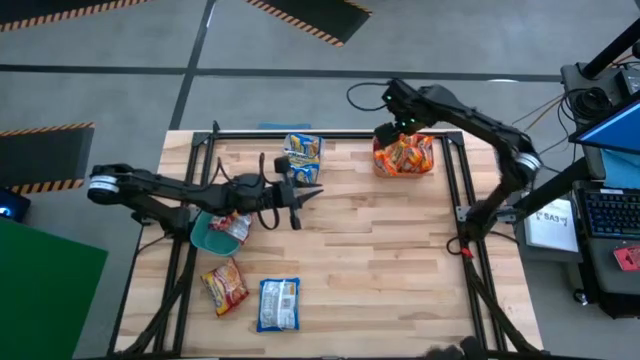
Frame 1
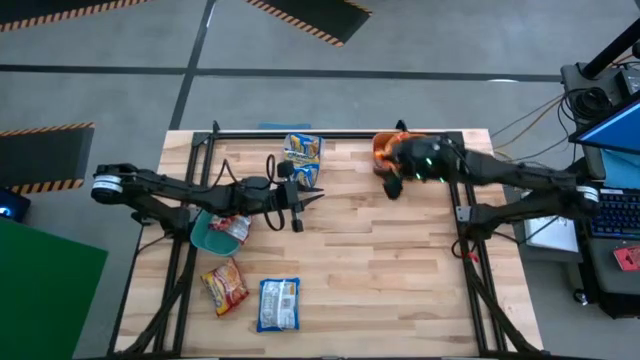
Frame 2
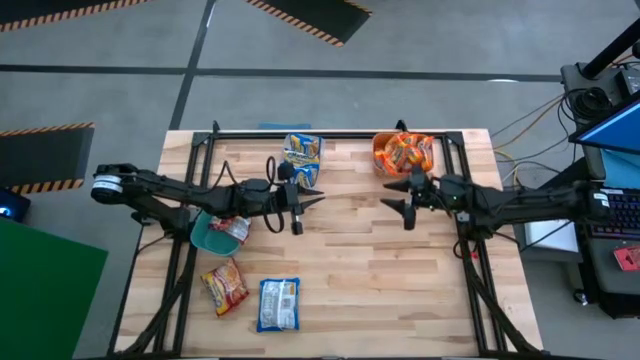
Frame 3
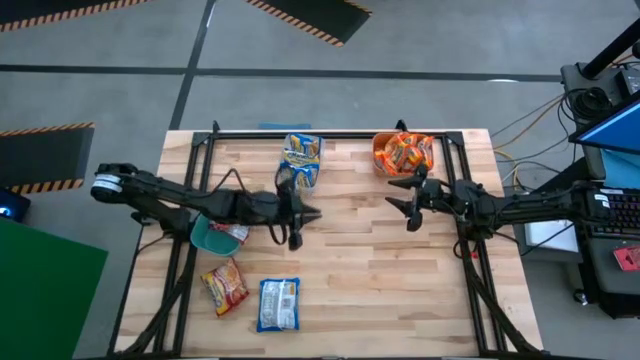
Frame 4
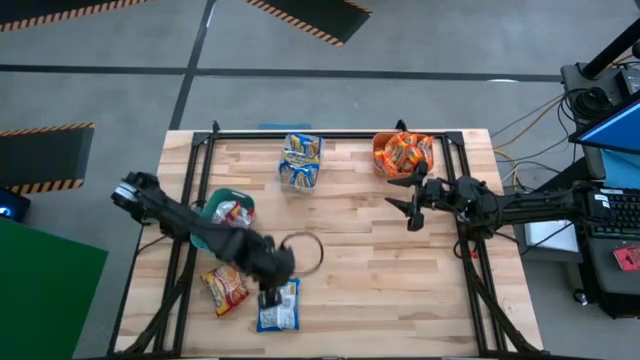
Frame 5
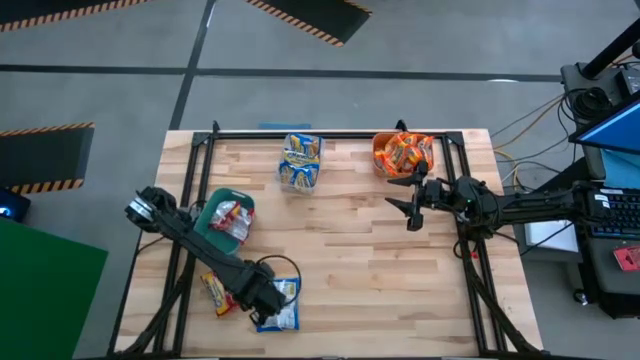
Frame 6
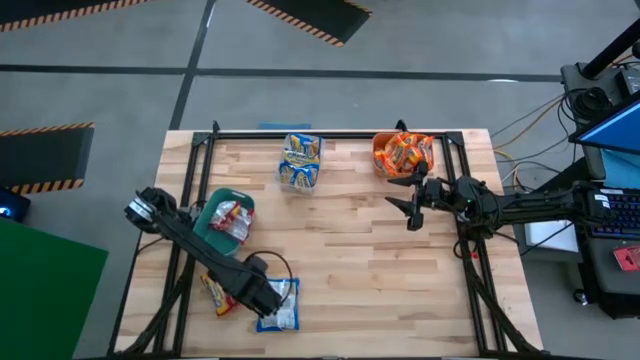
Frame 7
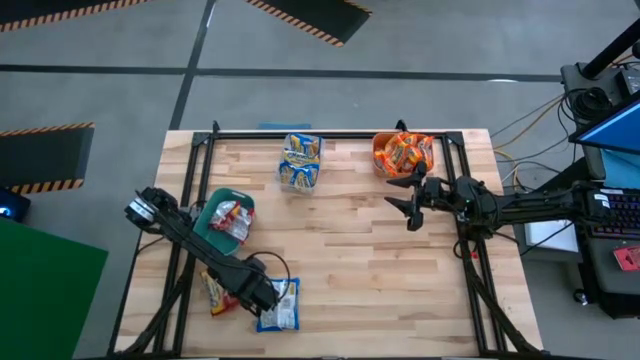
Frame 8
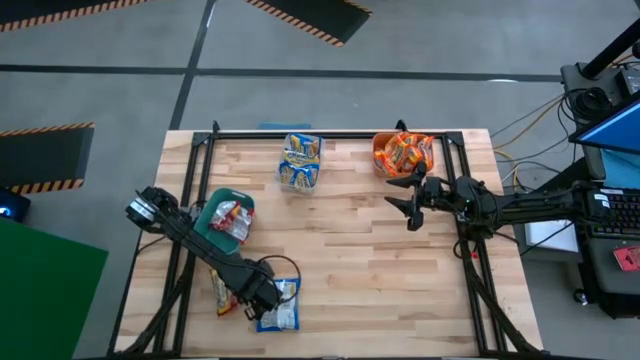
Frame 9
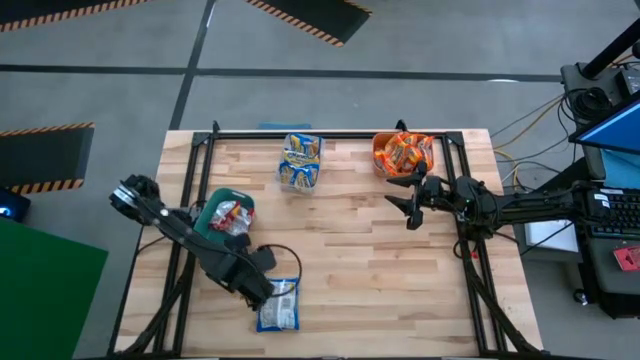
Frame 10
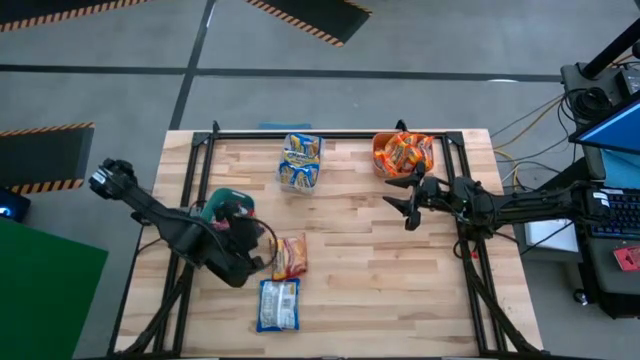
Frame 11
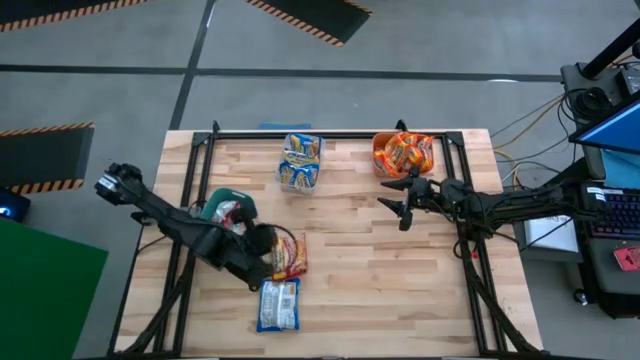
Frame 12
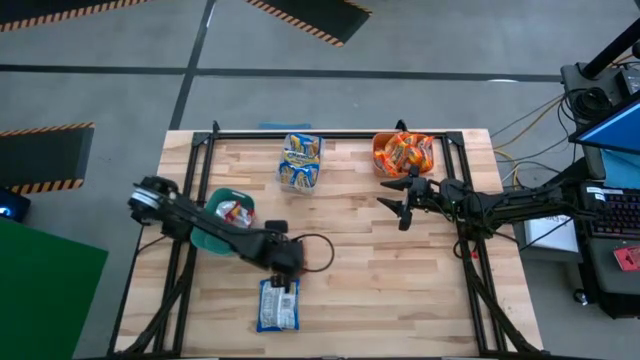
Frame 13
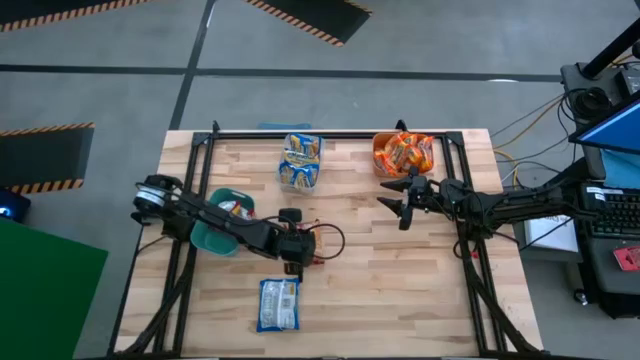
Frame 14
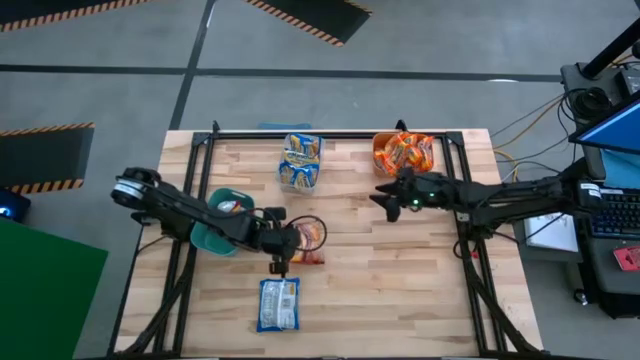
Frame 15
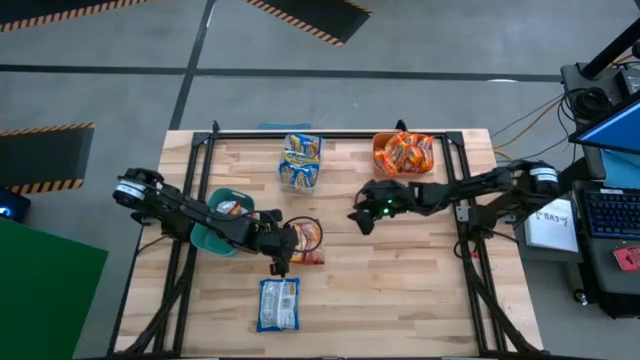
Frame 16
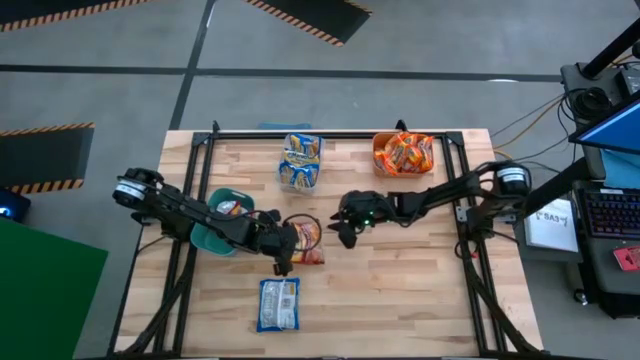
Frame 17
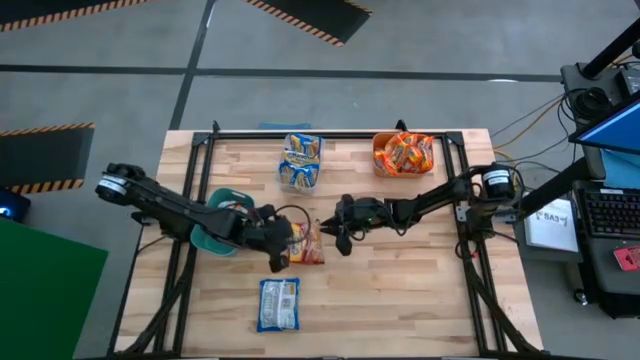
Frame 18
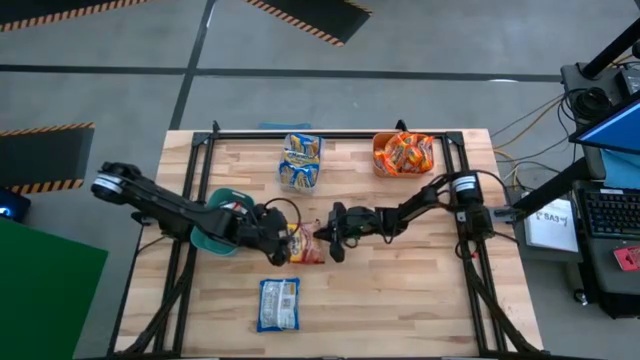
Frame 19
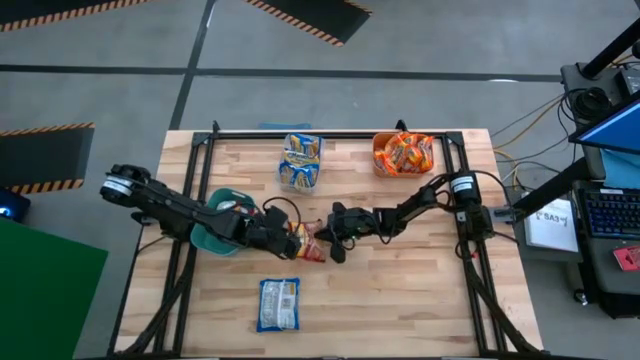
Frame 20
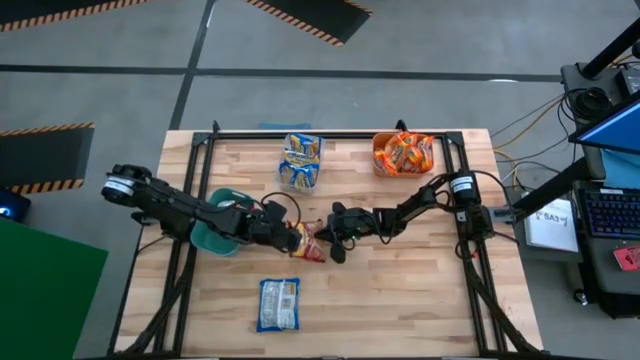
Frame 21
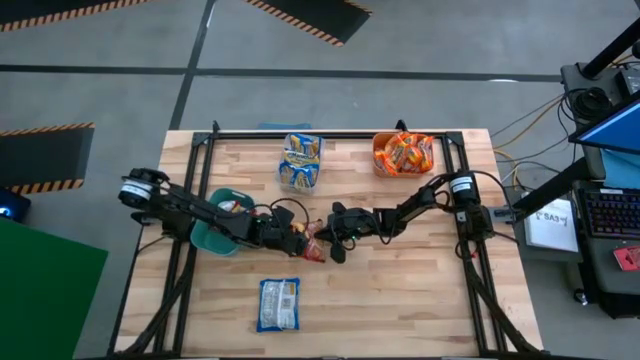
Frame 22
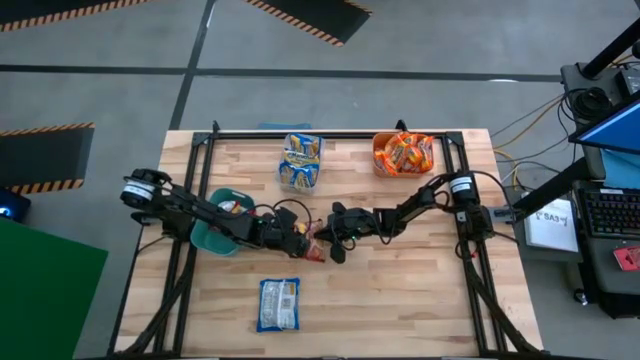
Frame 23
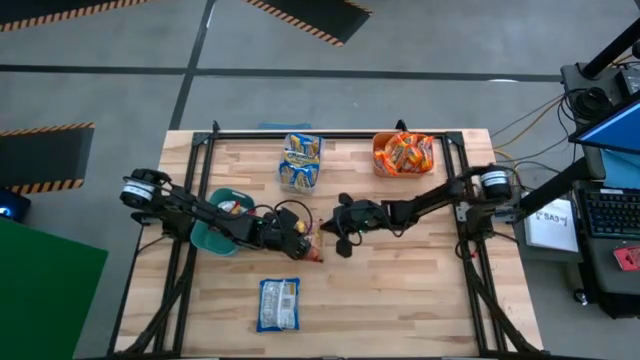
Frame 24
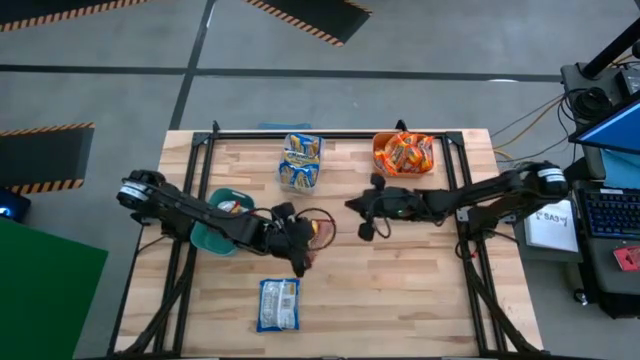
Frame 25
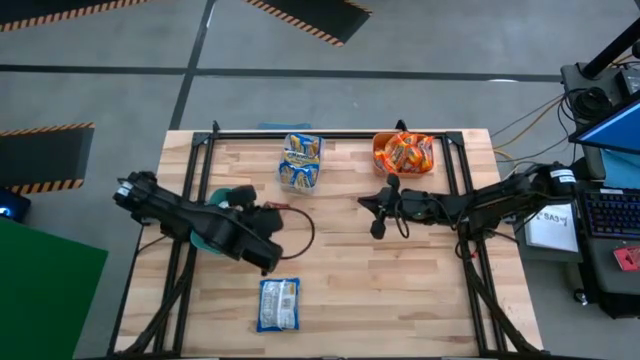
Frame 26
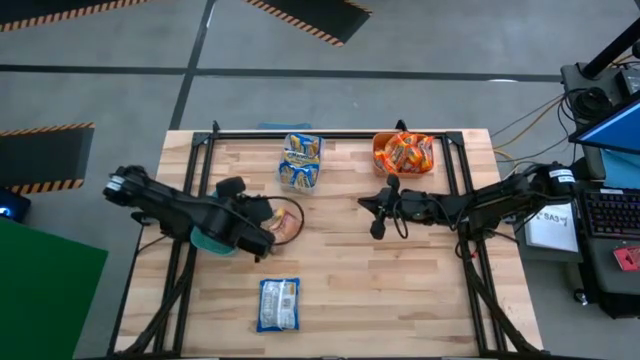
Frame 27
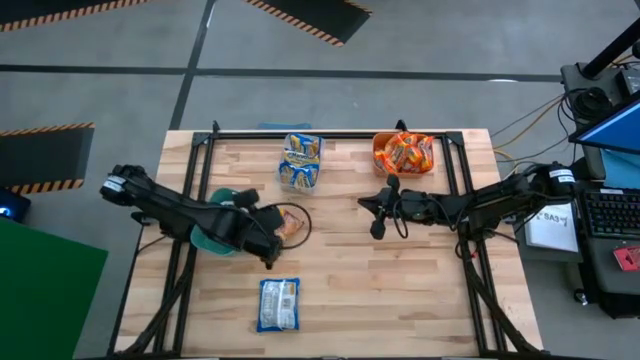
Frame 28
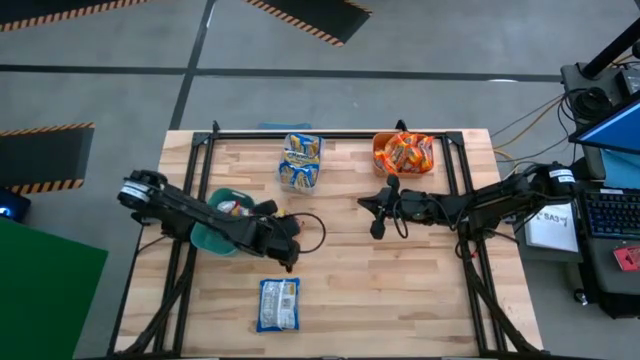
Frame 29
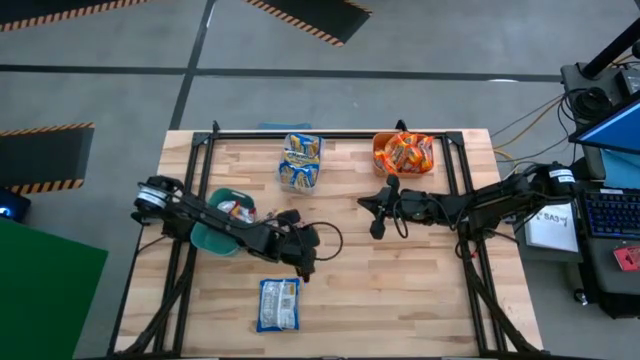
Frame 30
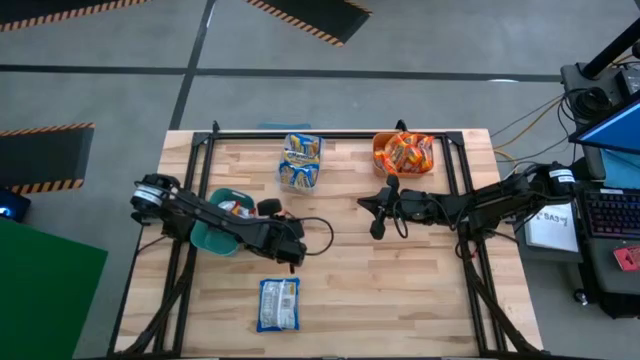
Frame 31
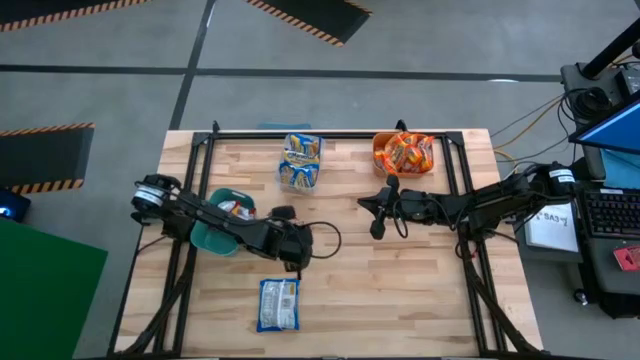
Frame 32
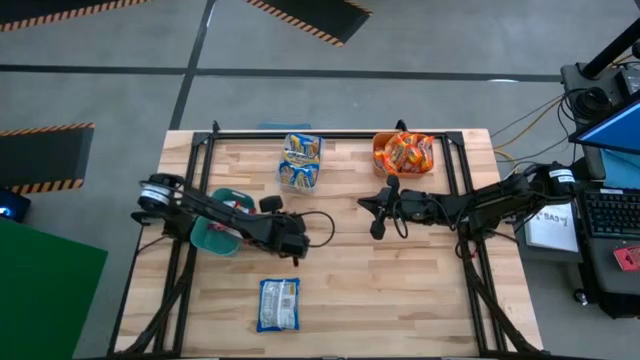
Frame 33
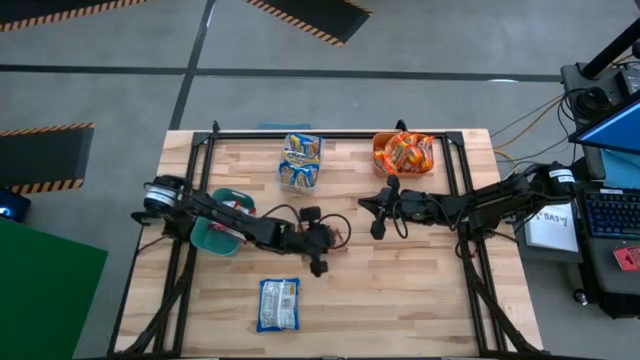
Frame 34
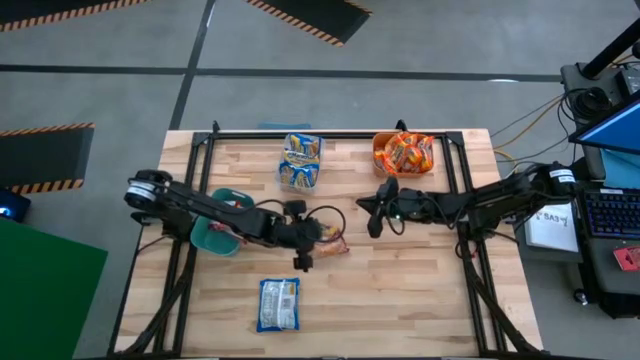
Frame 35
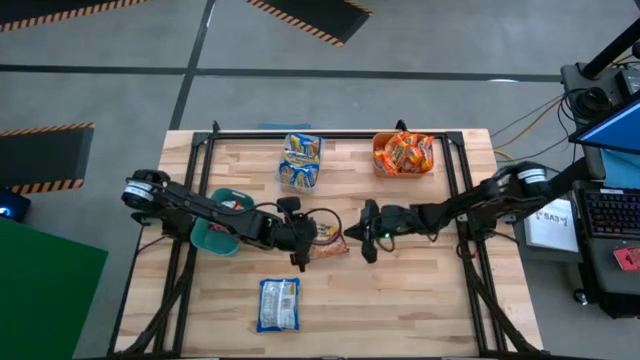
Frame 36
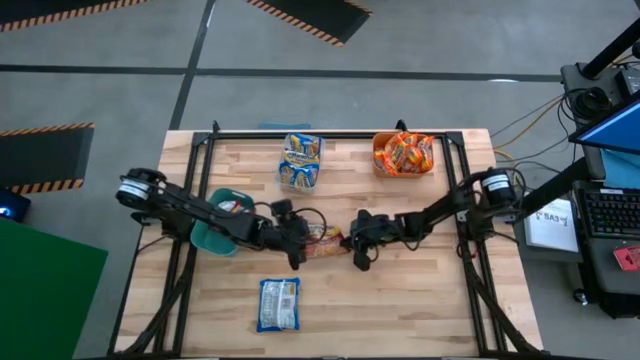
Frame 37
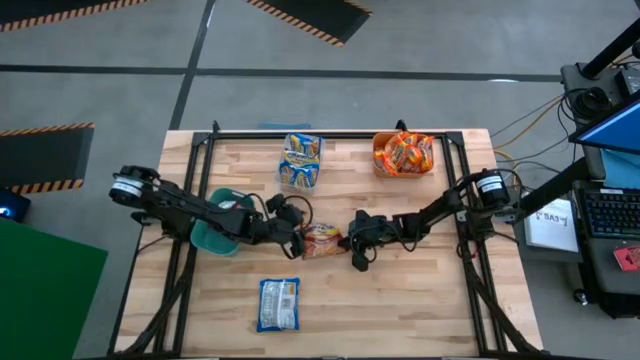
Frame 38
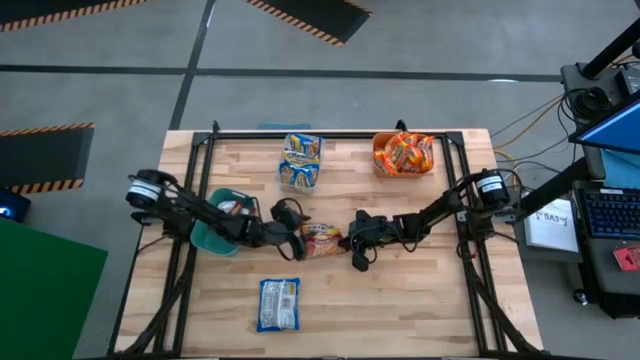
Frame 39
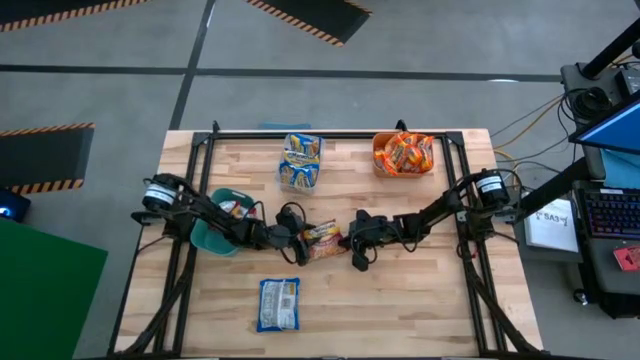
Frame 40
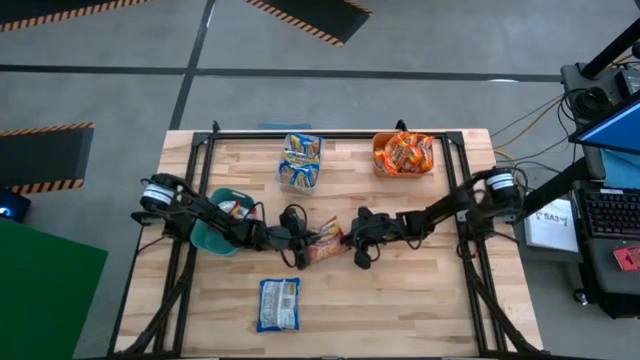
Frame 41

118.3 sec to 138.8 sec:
Task: Sort Maruchan noodles
Put the red noodle pack into the blue bin

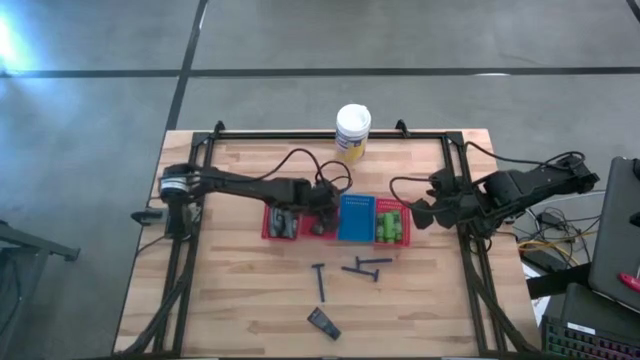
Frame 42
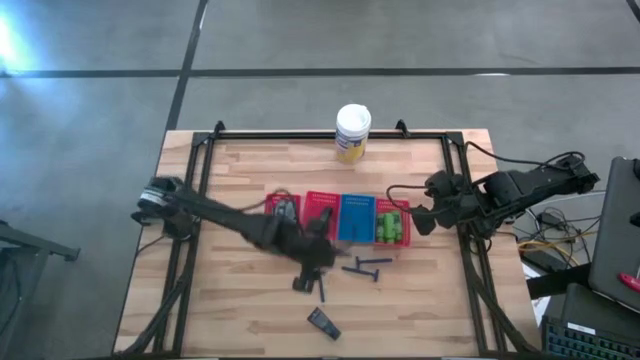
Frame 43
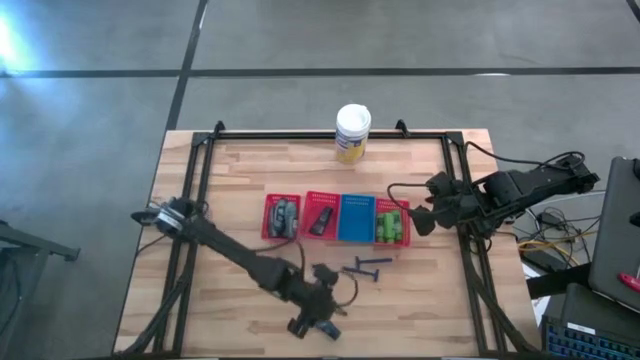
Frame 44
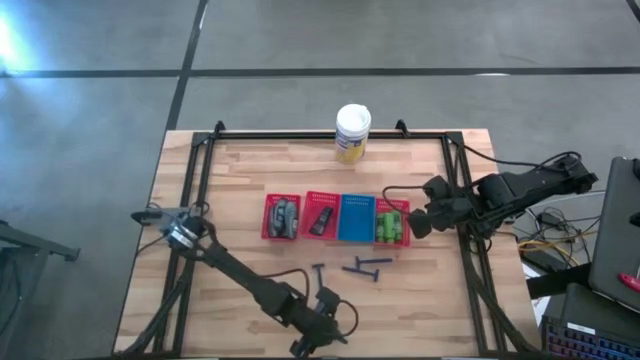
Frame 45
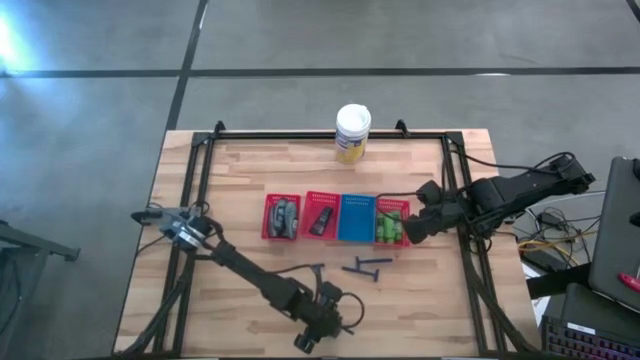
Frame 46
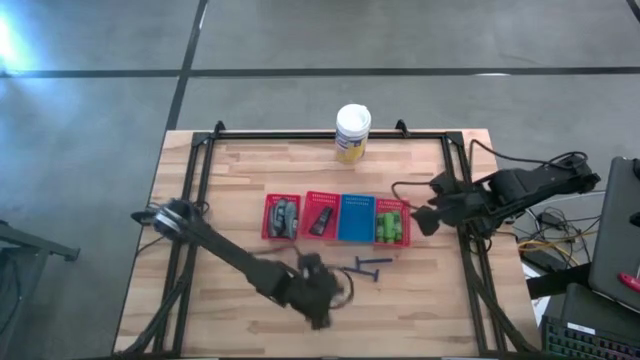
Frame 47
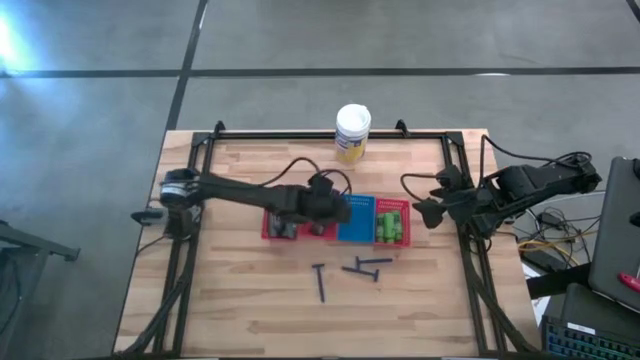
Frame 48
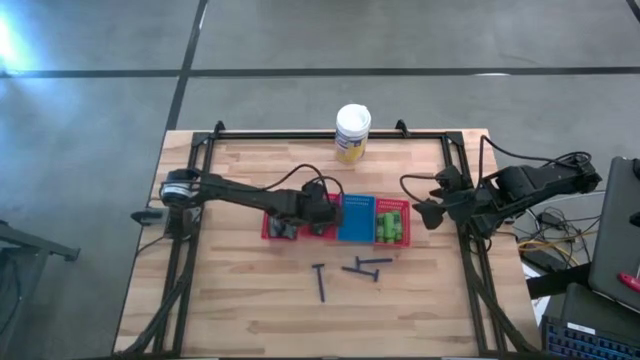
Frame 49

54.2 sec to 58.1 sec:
Task: Pick & Place Travel size toiletries
Put the blue shave cream into the middle red bin
